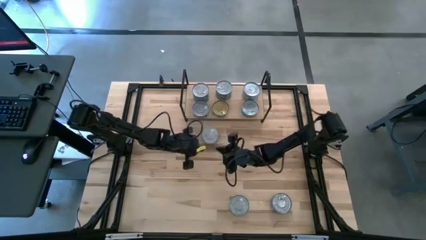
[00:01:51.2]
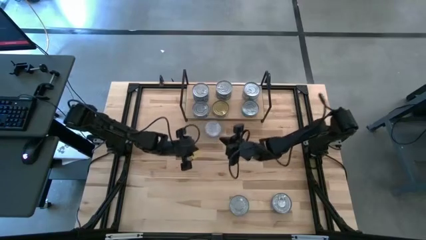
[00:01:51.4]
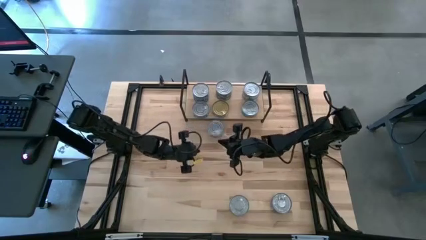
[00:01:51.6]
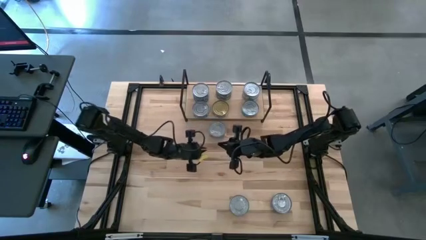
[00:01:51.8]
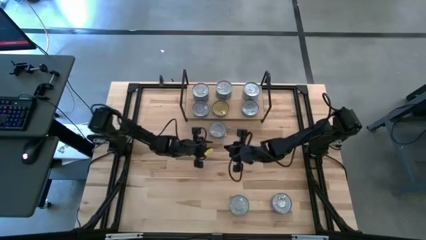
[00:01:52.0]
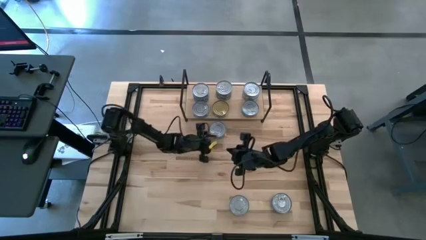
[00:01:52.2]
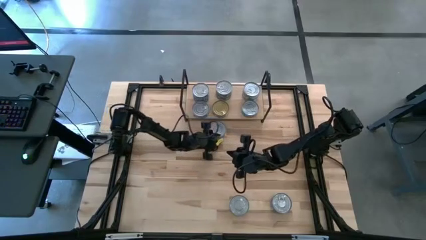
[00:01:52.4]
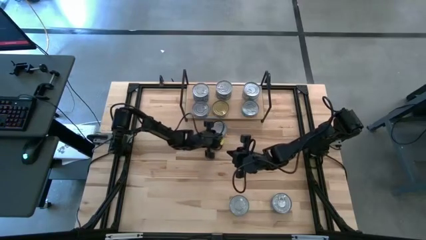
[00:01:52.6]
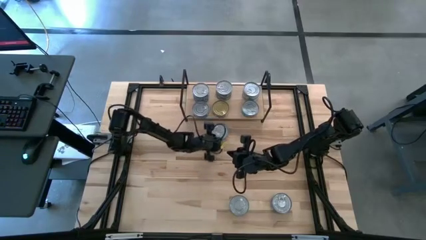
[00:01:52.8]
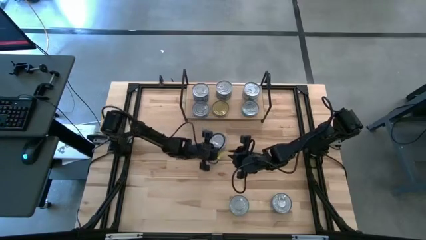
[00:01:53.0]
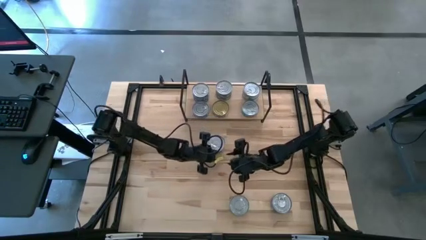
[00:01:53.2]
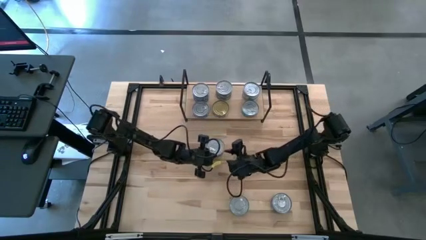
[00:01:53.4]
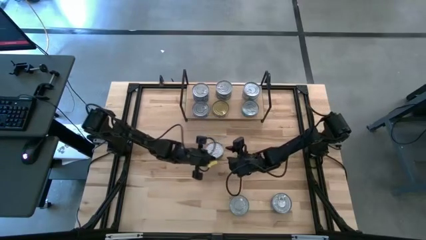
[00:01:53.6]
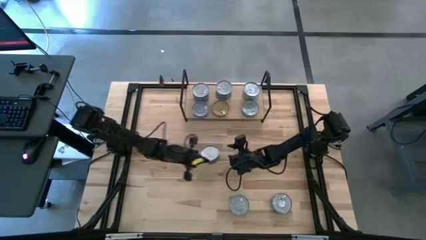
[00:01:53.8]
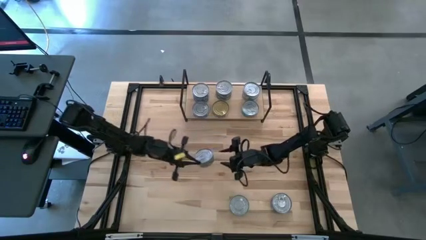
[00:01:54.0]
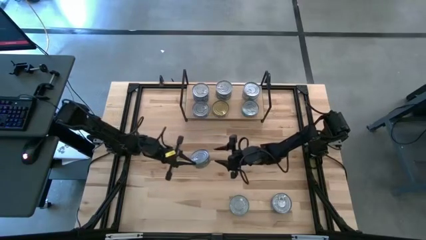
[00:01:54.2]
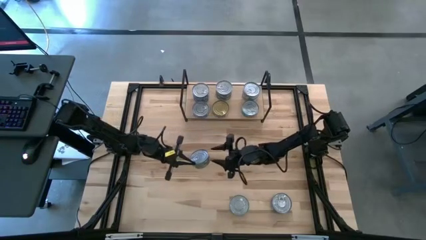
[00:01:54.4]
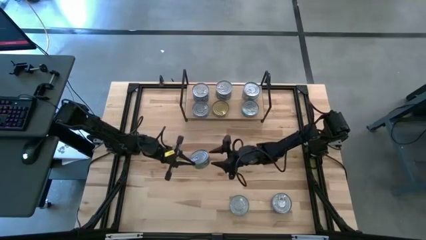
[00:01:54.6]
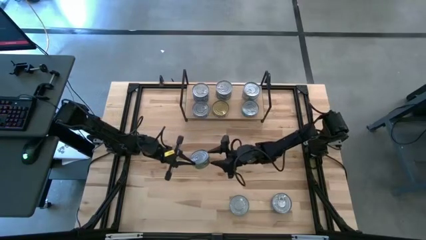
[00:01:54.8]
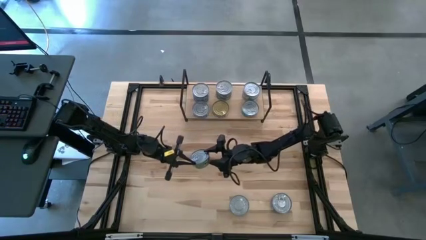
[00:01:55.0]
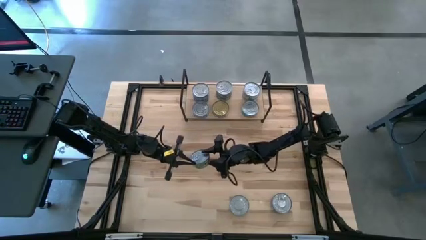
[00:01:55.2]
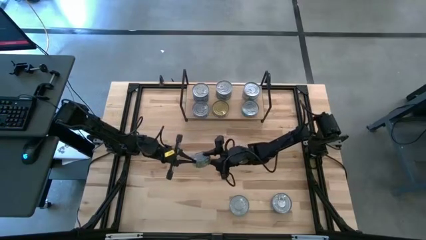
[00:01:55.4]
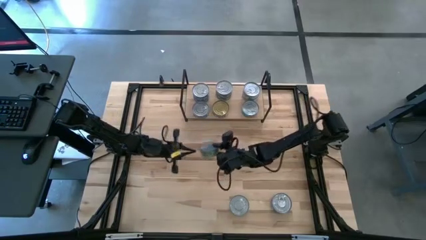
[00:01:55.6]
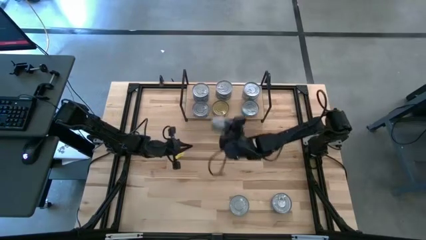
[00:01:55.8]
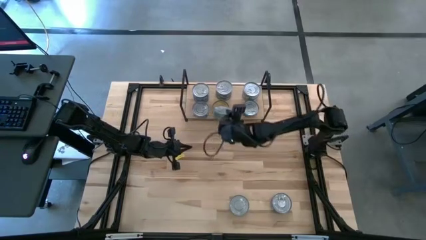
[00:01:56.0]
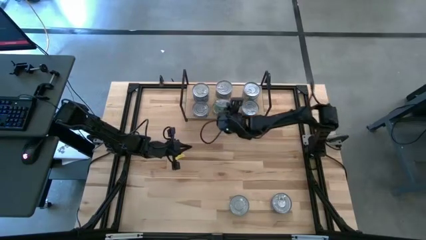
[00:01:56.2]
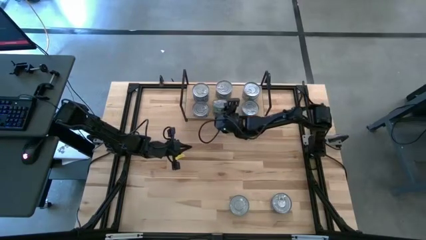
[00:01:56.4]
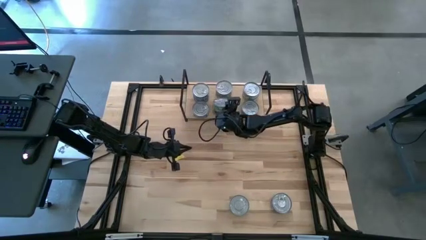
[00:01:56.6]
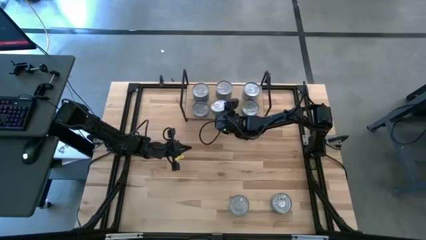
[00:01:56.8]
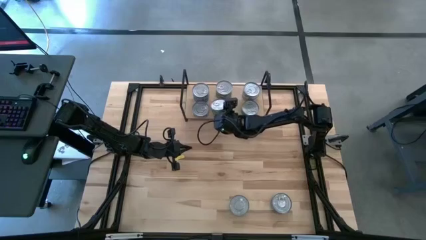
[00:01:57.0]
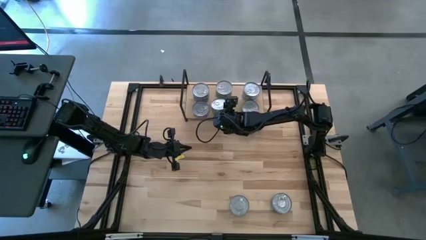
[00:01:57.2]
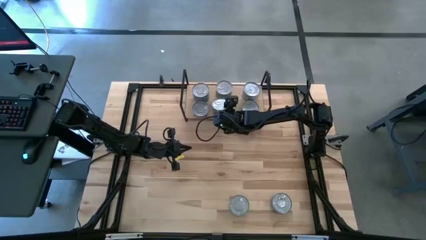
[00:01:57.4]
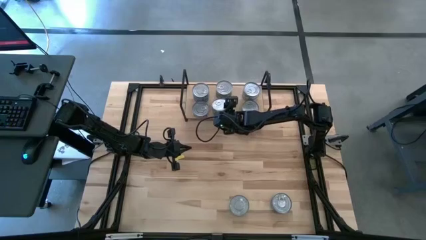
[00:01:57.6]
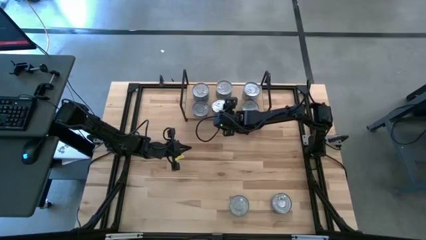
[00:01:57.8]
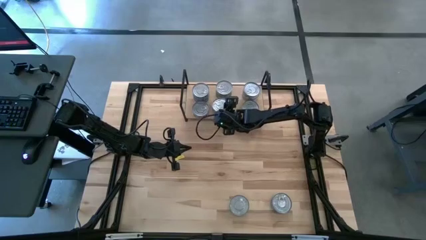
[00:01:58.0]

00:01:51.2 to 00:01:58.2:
Task: Stack canned seafood by type on shelf
Stack the green tuna can on top of the bottom green tuna can on the shelf

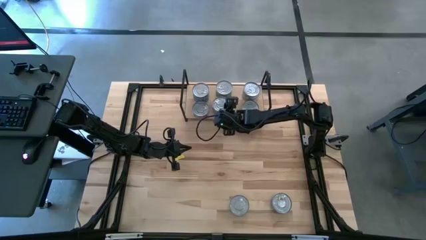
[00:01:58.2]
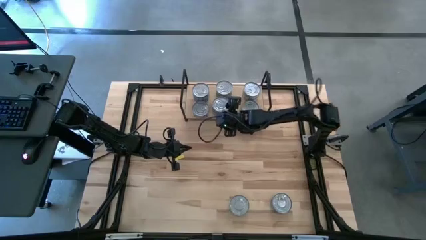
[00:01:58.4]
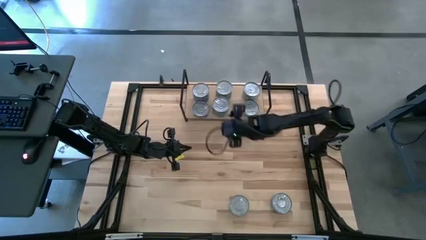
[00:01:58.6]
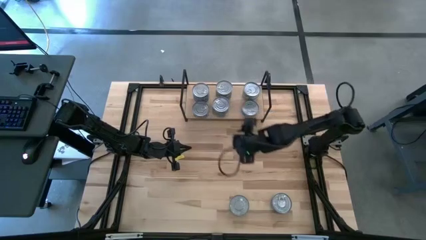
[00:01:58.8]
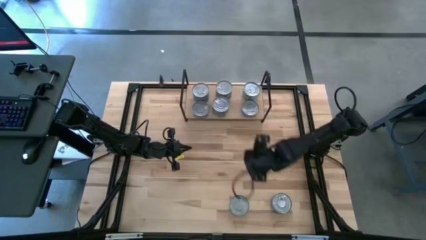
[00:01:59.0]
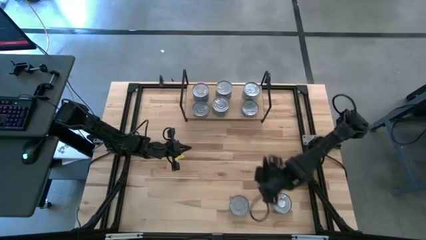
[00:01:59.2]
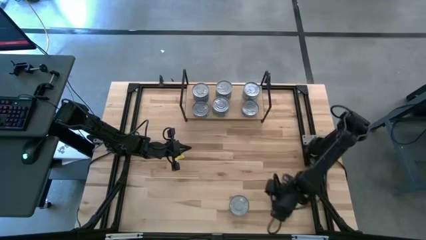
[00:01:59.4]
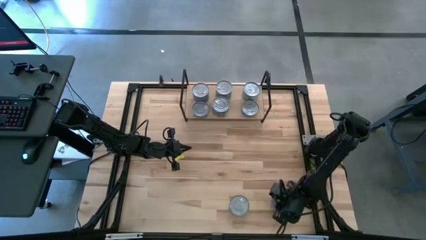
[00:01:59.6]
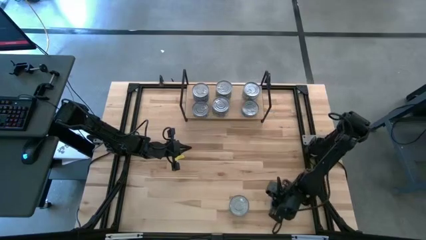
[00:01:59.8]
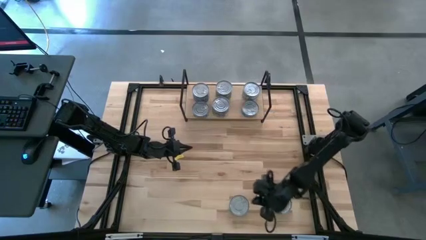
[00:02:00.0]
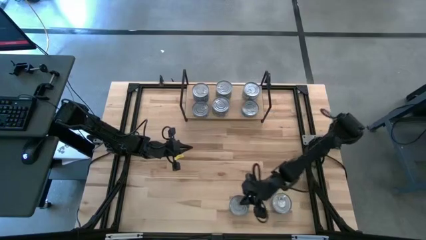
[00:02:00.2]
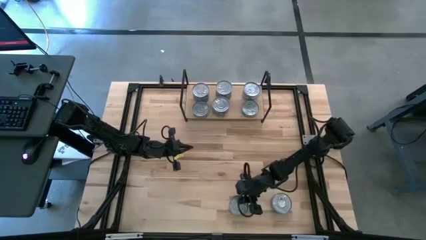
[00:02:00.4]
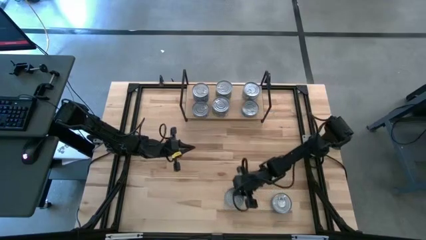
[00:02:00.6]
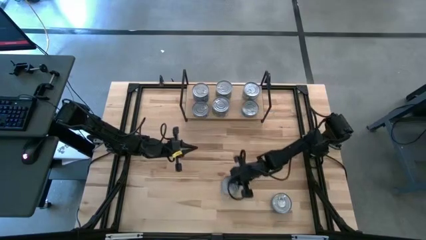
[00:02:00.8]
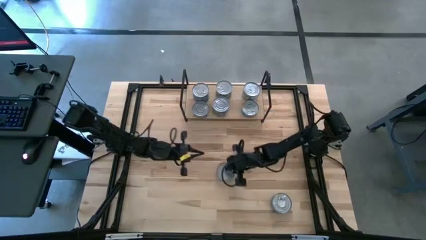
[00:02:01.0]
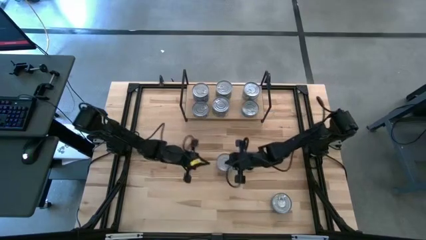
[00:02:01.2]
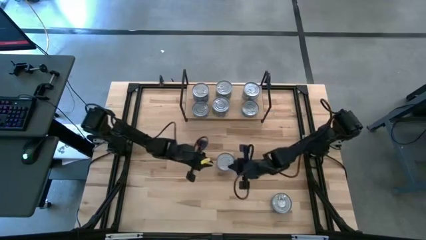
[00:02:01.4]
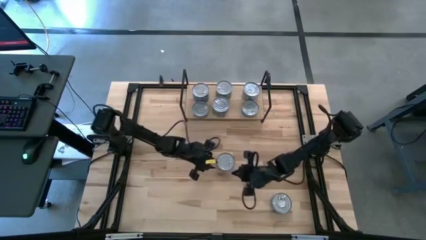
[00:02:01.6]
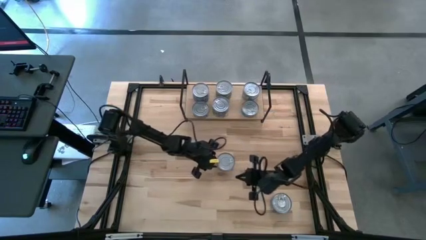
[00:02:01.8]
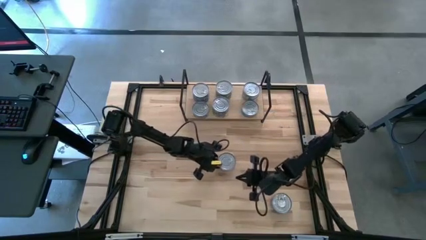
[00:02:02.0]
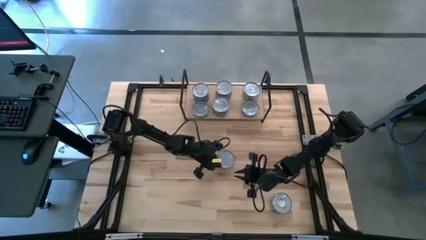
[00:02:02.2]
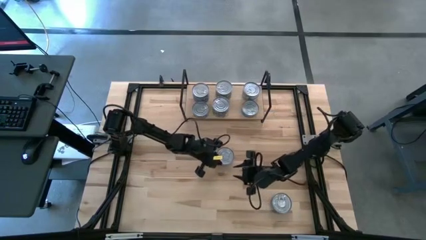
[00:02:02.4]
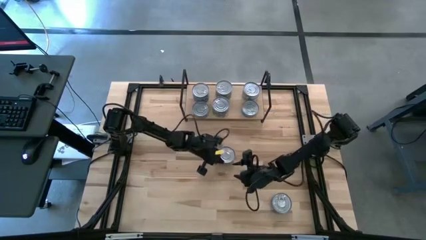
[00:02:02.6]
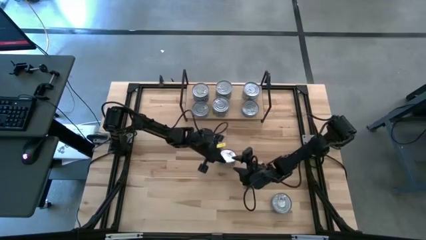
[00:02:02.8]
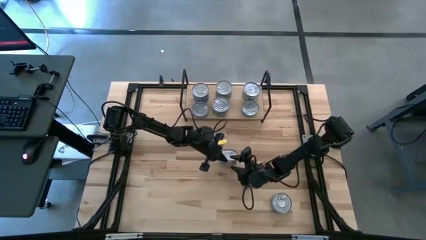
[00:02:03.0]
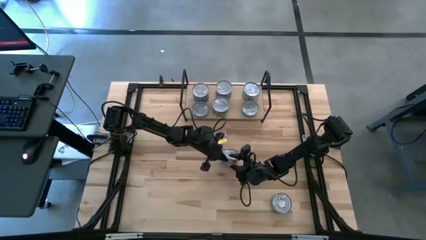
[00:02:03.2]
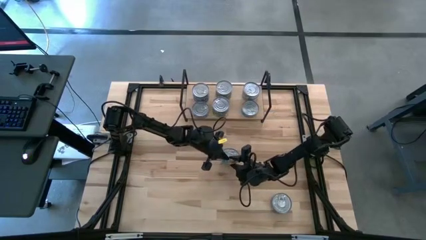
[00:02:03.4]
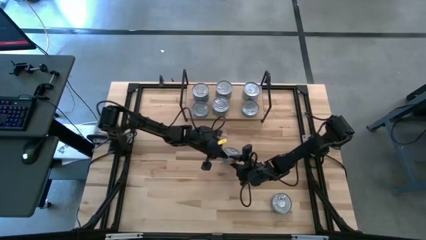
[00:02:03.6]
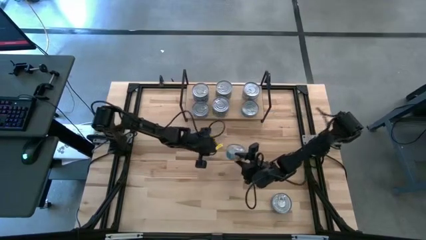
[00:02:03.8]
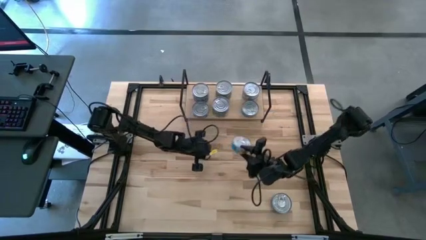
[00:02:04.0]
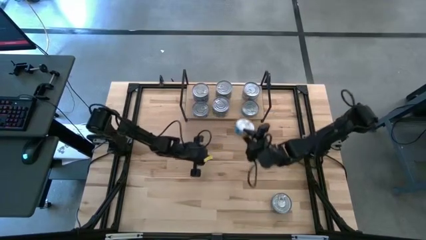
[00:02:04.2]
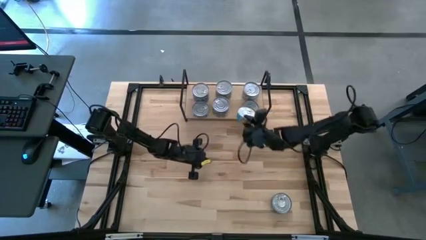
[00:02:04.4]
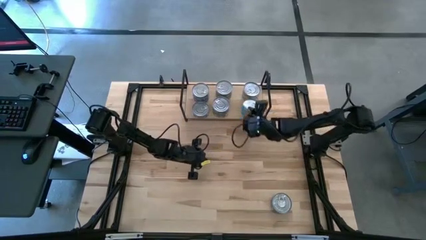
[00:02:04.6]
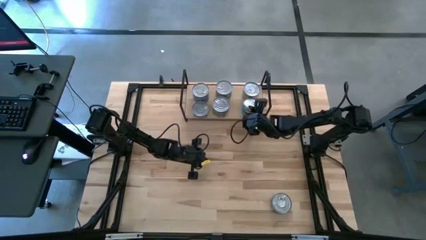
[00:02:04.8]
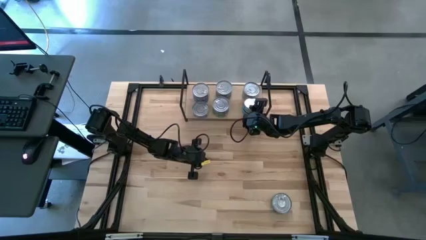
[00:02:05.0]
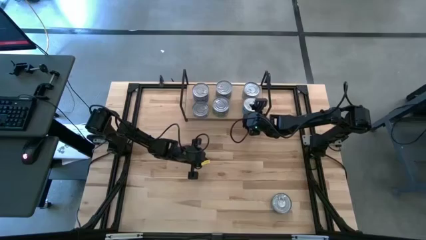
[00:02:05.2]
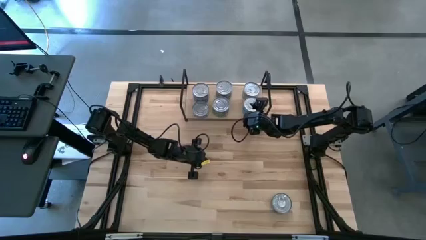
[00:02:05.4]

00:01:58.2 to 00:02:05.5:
Stack the yellow-blue tuna can on top of the bottom yellow-blue tuna can on the shelf
